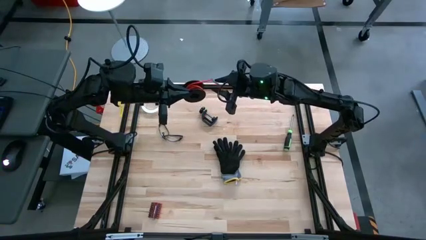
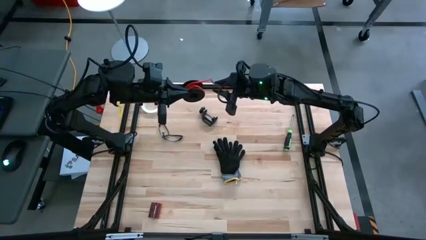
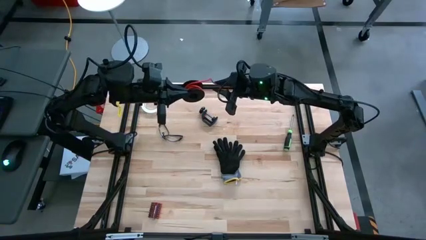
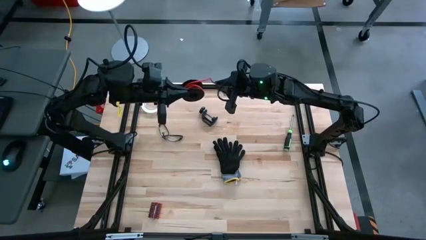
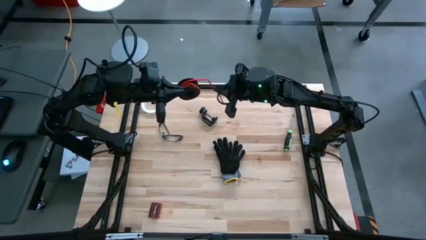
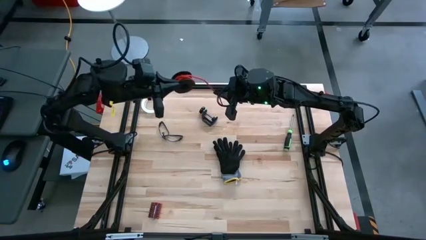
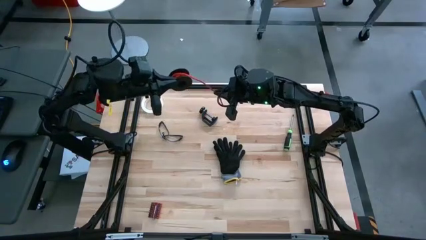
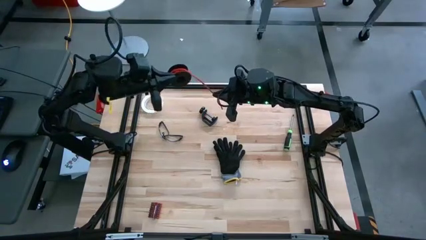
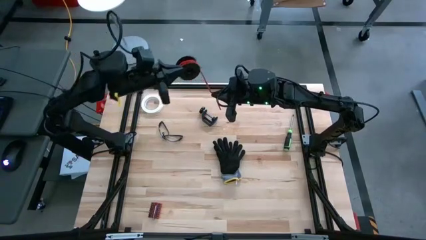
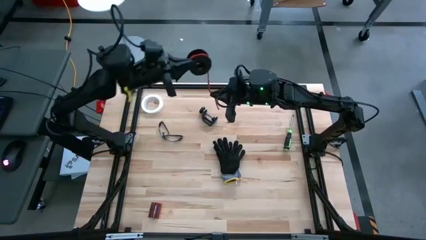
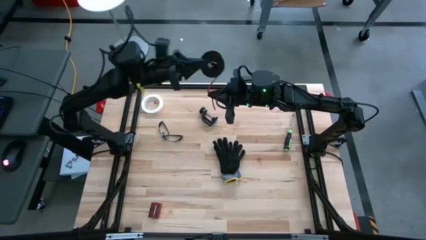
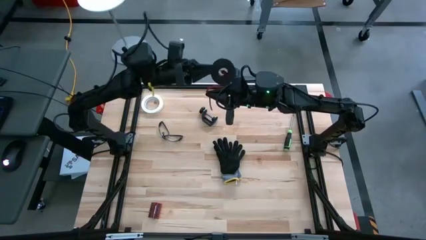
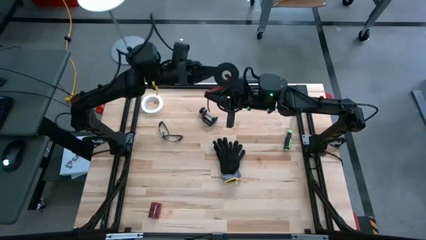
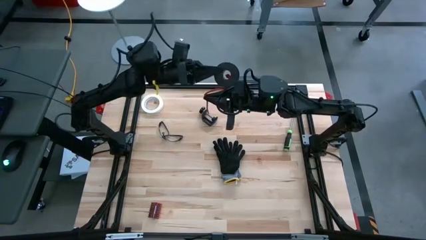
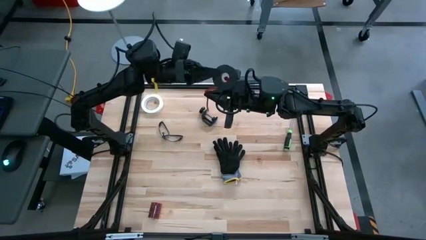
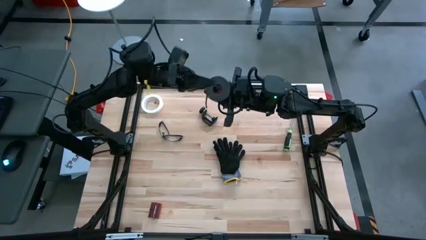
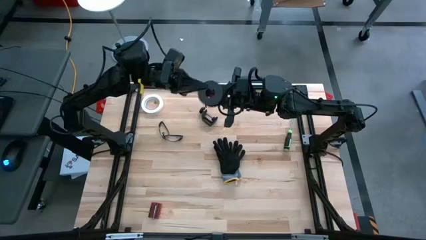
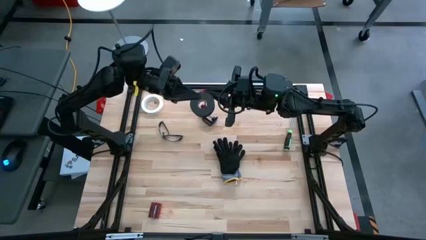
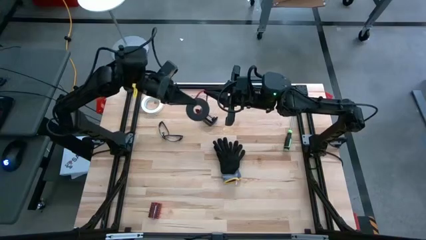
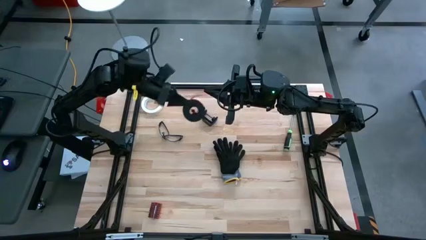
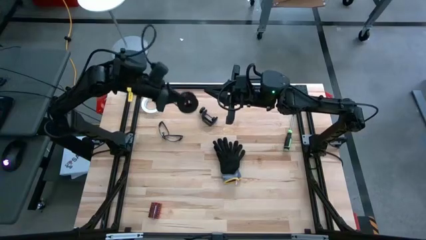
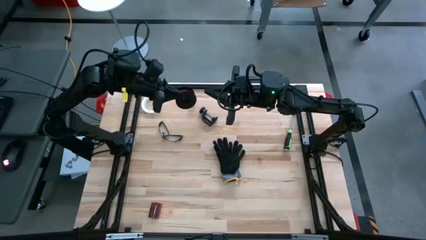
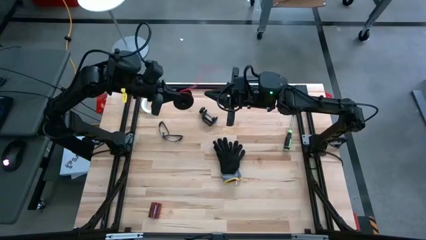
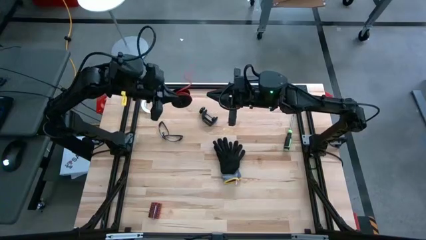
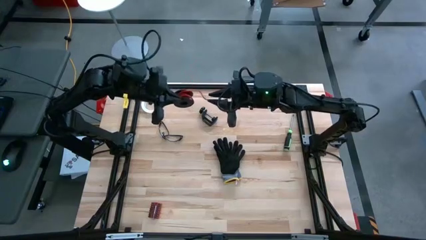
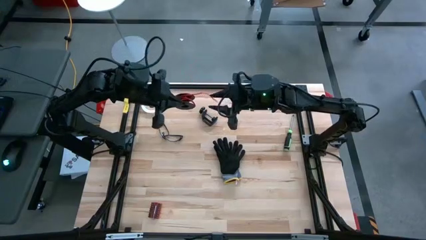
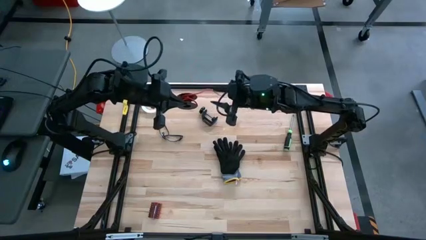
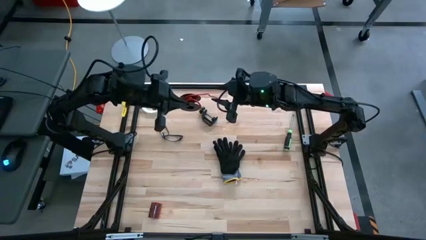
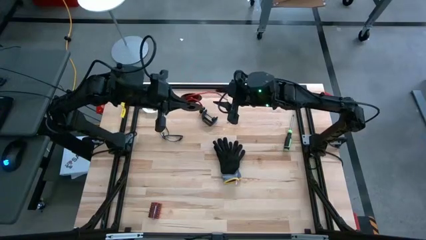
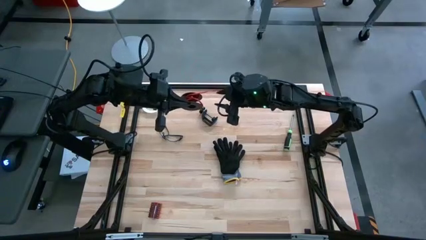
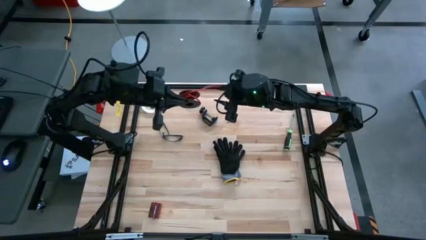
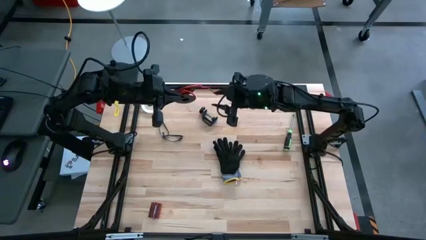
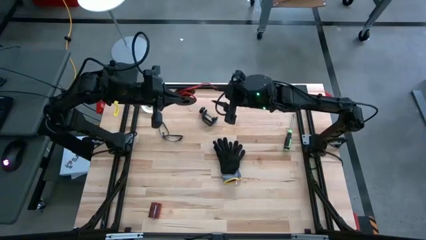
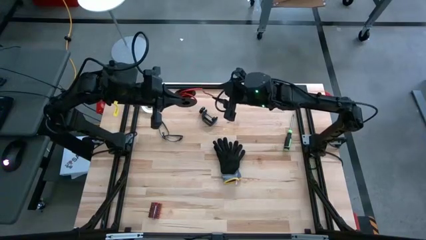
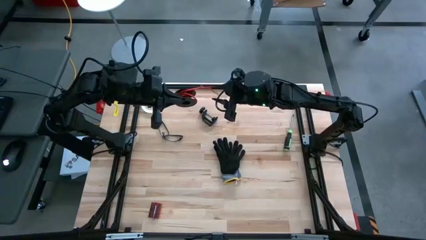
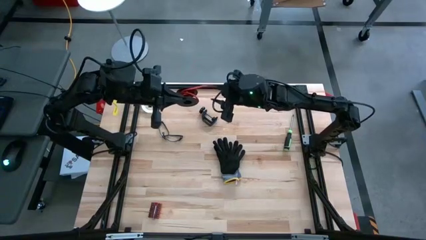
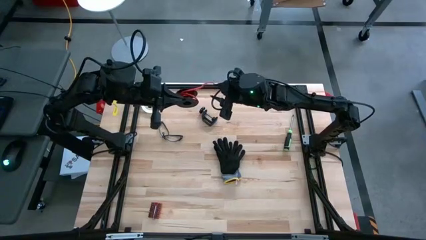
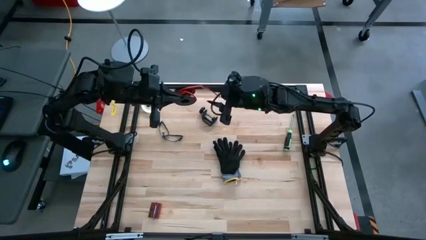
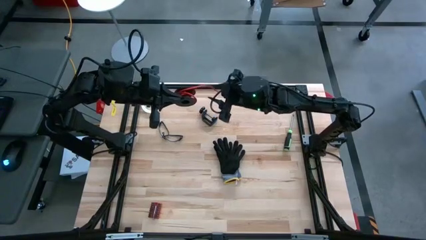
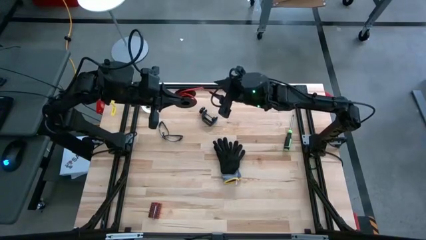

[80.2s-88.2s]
Task: Coil cords
Coil the orange wire onto the spool

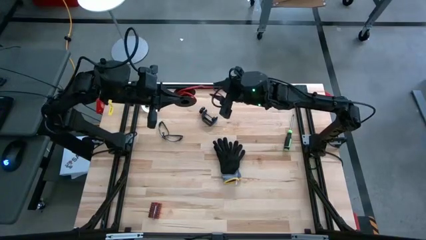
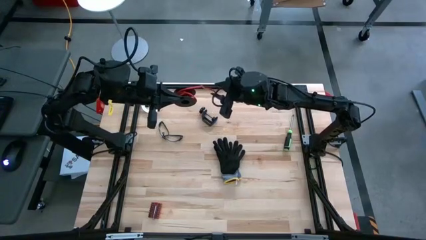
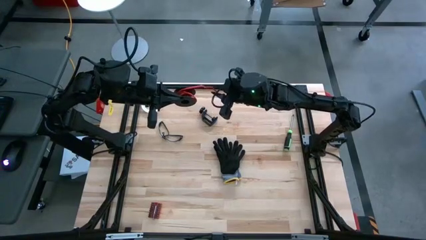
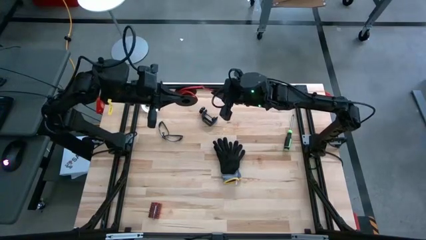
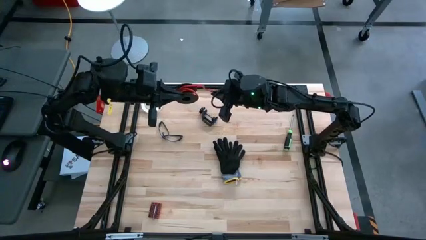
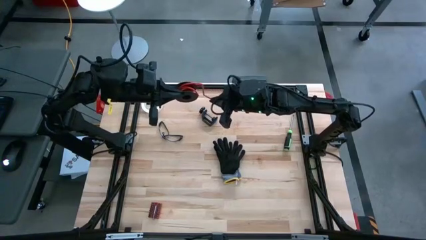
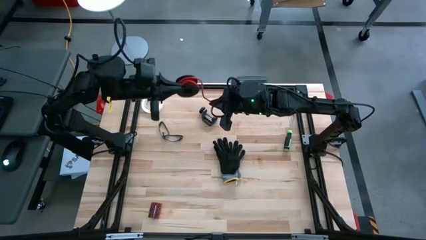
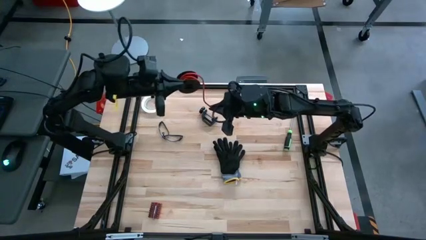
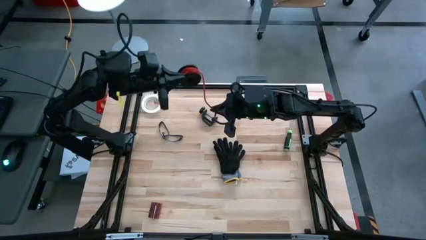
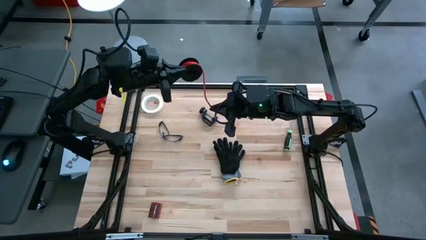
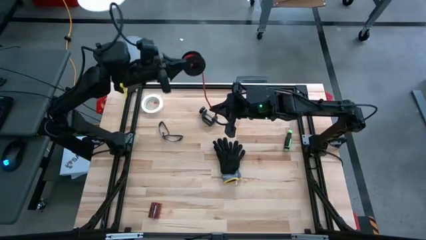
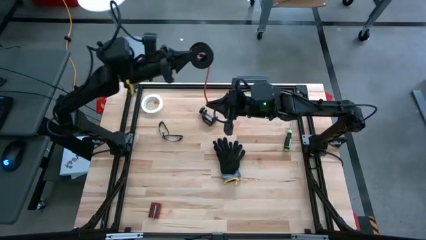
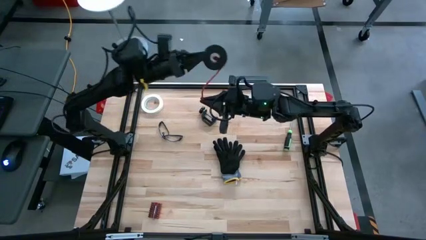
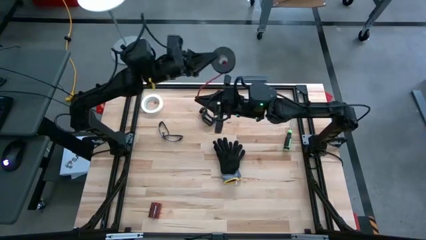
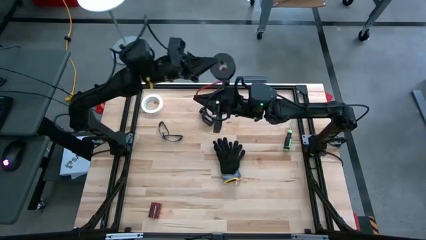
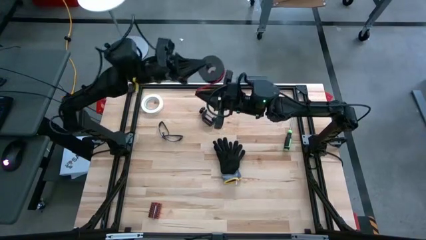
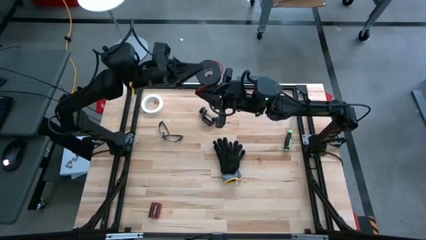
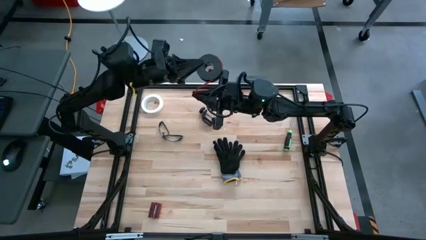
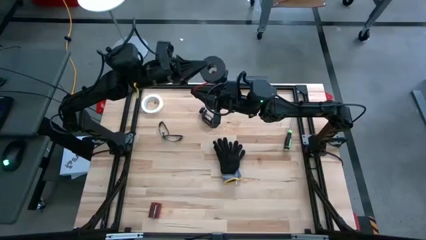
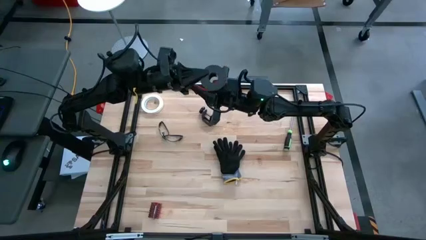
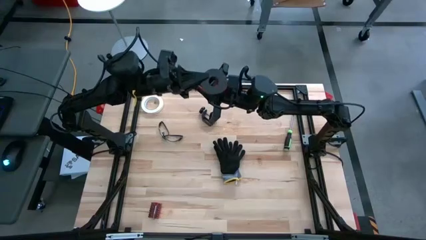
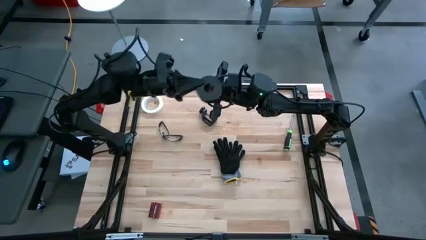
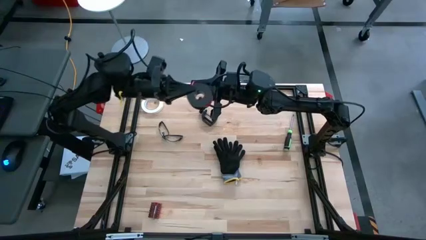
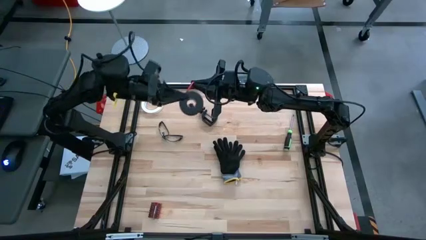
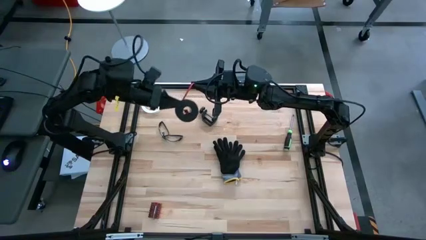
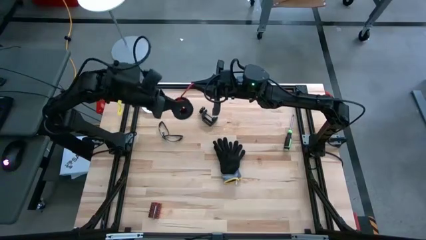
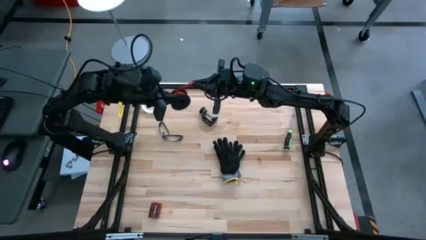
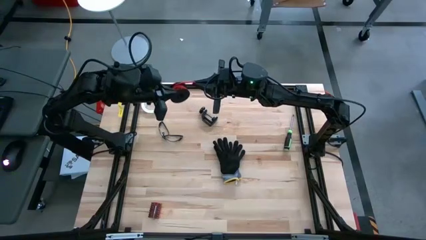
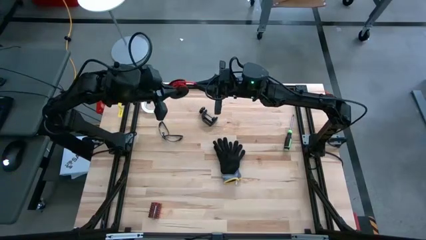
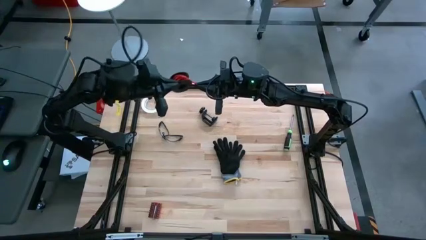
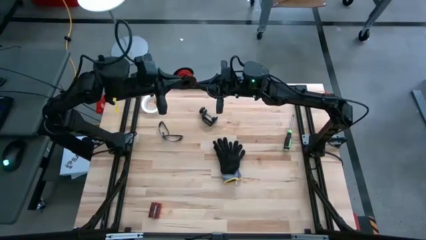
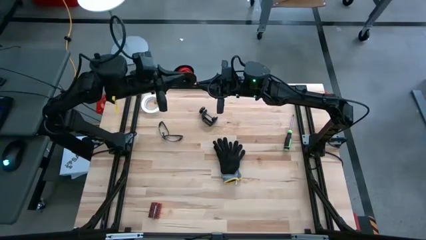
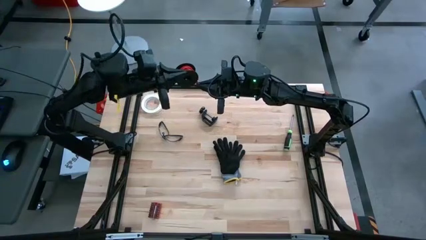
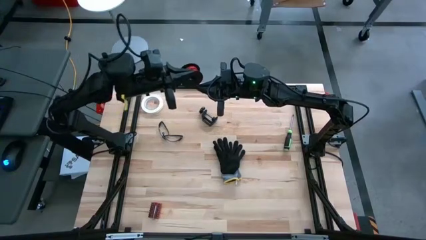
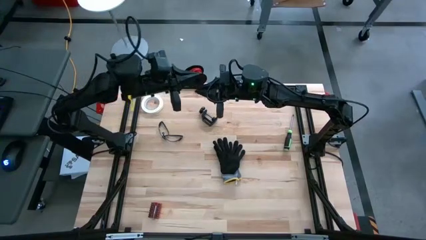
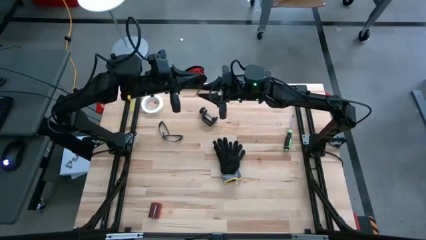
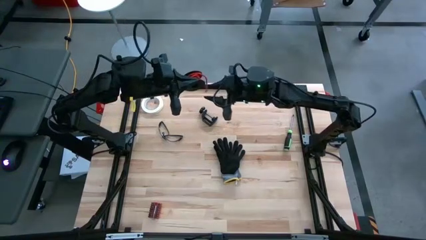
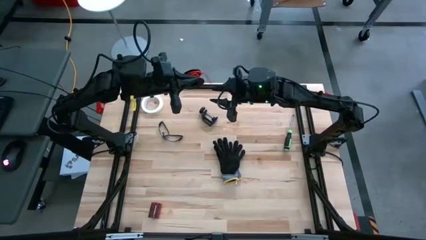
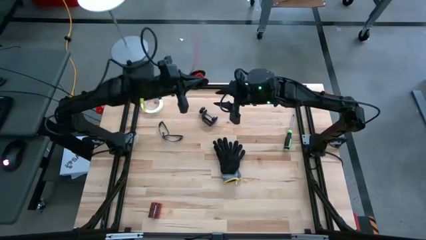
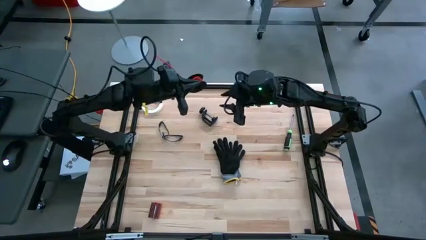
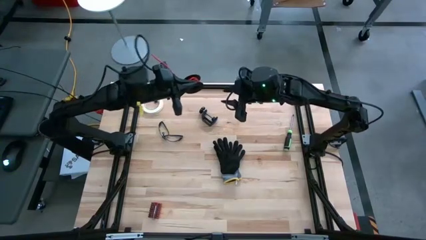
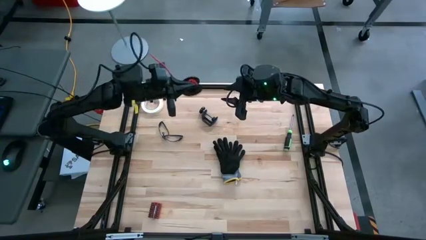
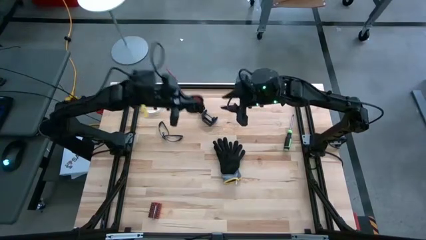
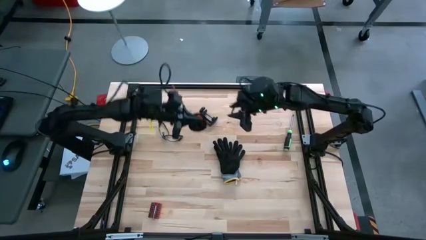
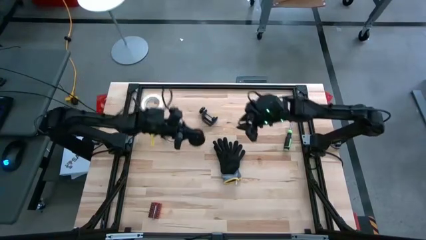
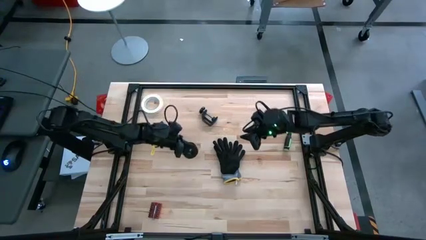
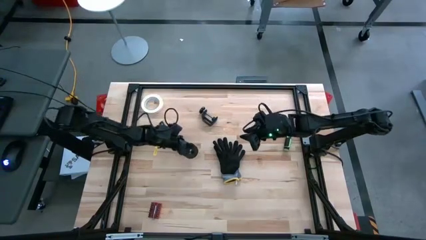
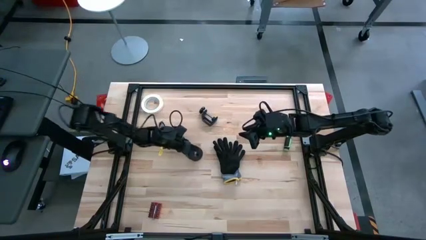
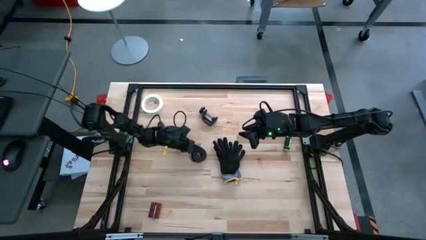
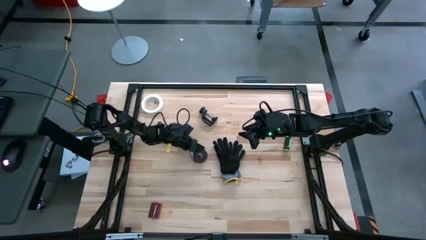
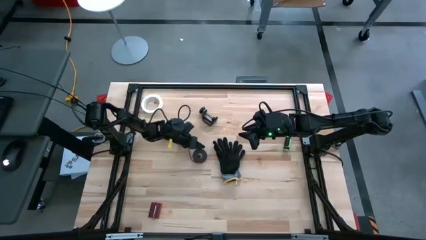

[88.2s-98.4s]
Coil the orange wire onto the spool
